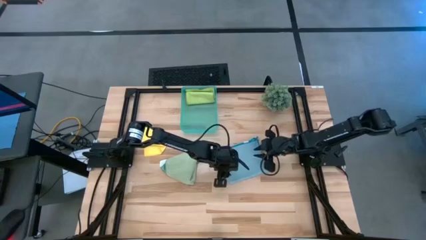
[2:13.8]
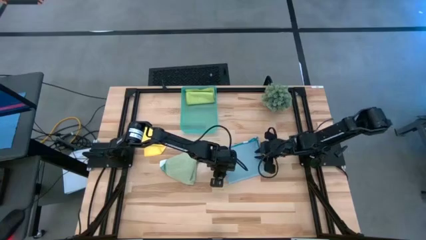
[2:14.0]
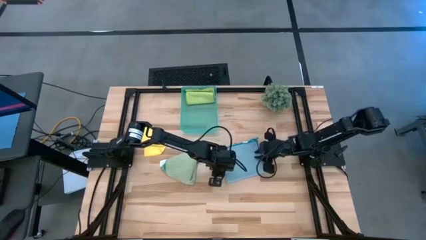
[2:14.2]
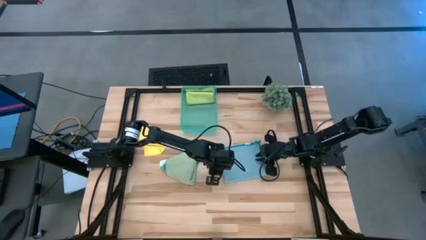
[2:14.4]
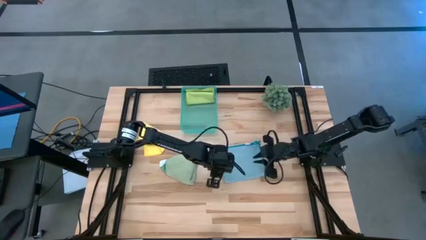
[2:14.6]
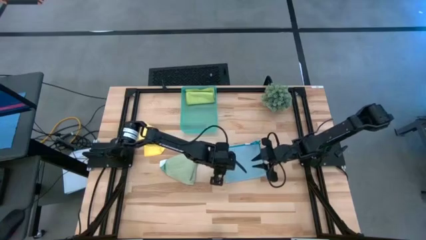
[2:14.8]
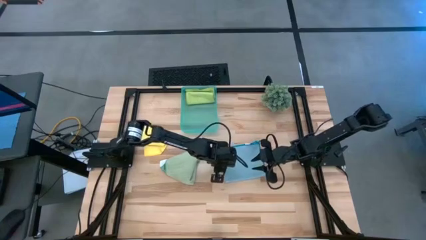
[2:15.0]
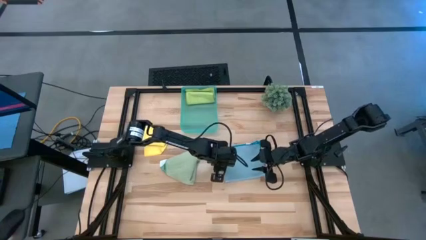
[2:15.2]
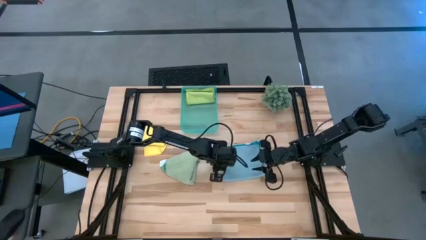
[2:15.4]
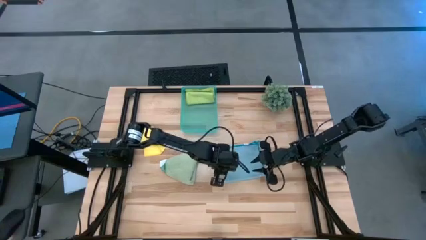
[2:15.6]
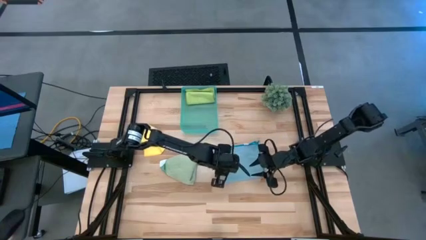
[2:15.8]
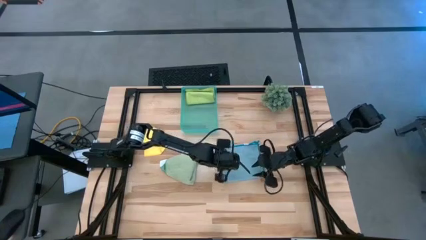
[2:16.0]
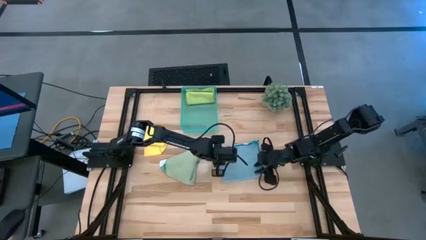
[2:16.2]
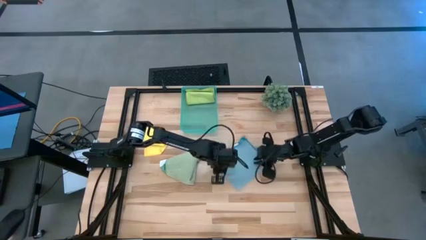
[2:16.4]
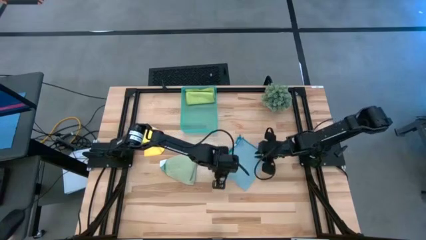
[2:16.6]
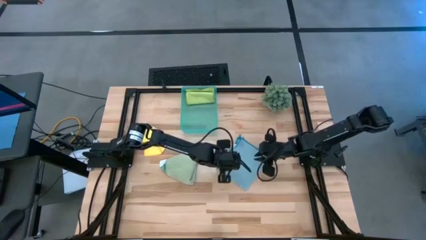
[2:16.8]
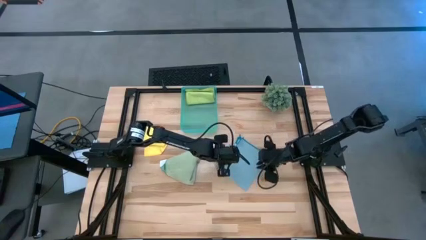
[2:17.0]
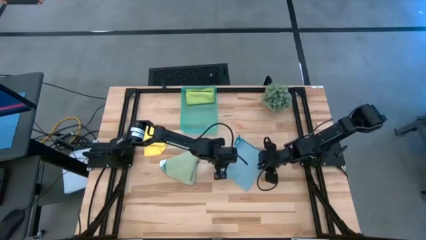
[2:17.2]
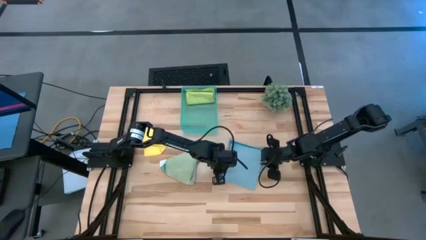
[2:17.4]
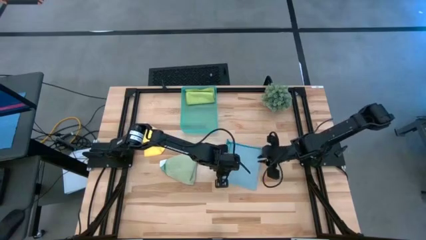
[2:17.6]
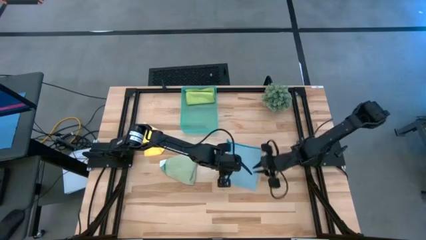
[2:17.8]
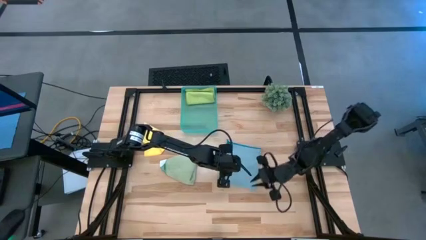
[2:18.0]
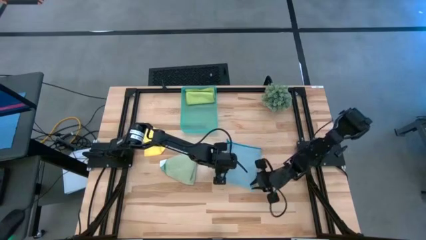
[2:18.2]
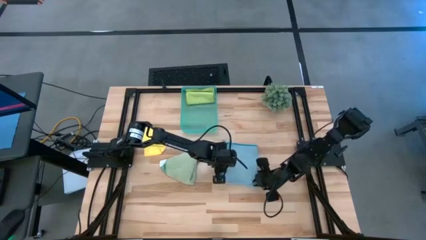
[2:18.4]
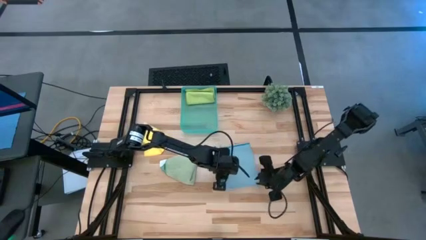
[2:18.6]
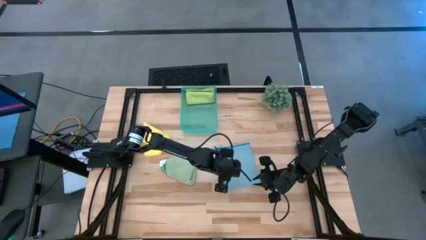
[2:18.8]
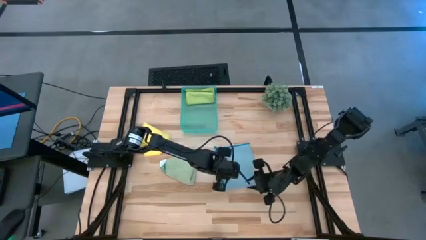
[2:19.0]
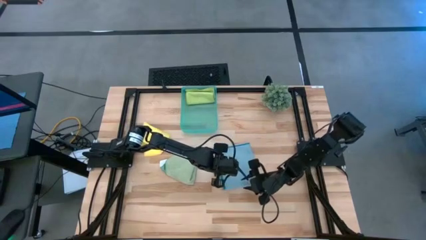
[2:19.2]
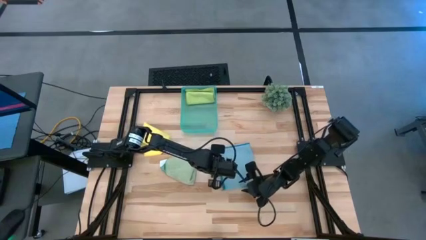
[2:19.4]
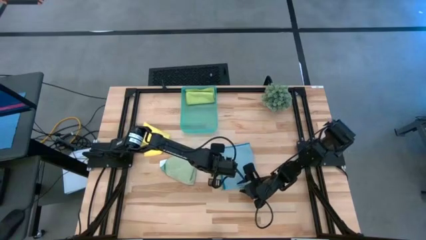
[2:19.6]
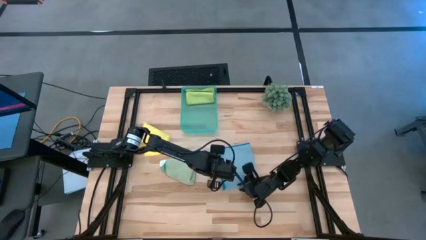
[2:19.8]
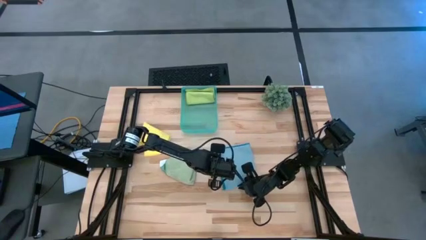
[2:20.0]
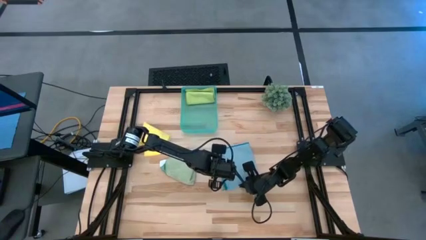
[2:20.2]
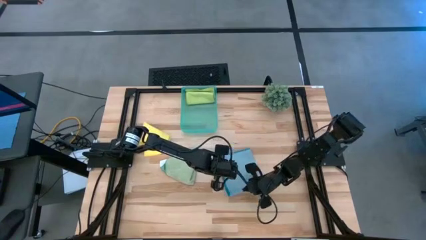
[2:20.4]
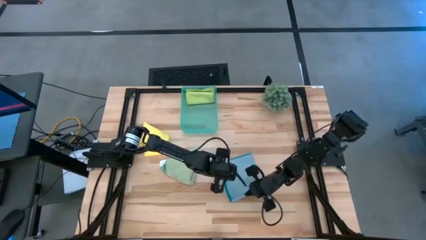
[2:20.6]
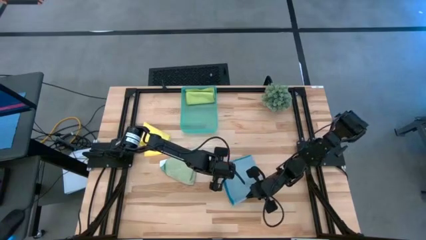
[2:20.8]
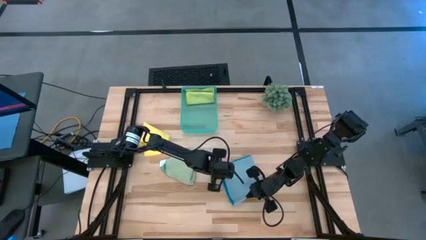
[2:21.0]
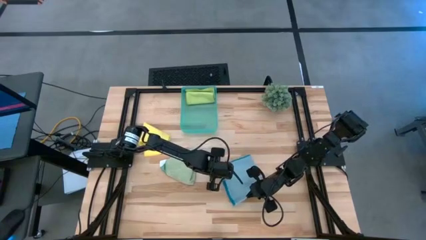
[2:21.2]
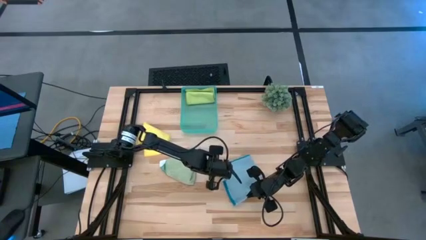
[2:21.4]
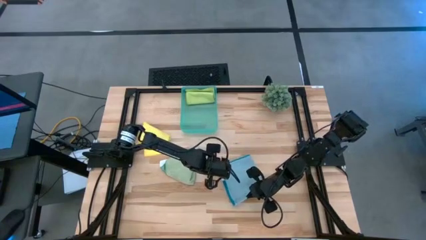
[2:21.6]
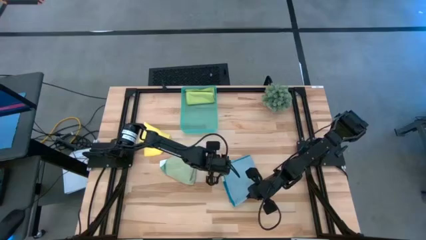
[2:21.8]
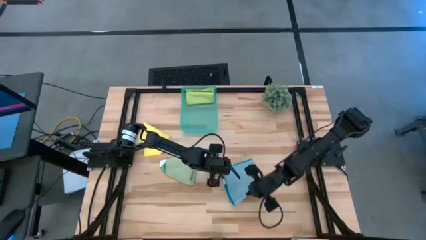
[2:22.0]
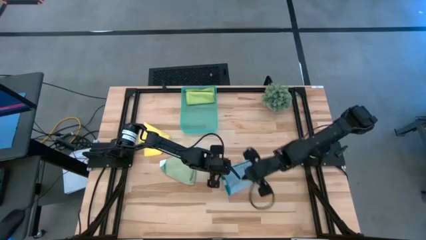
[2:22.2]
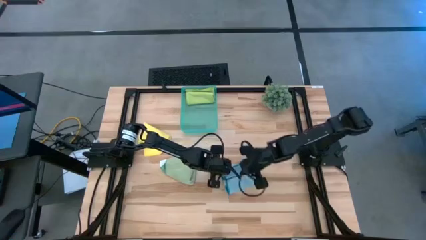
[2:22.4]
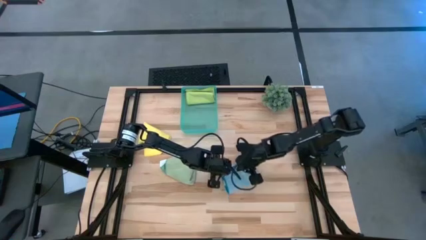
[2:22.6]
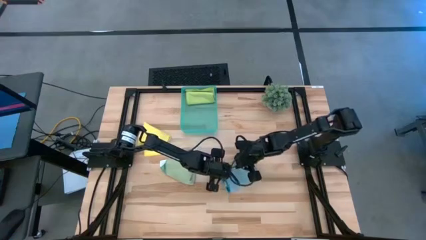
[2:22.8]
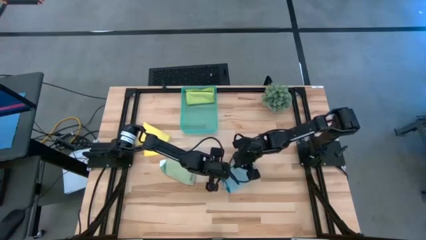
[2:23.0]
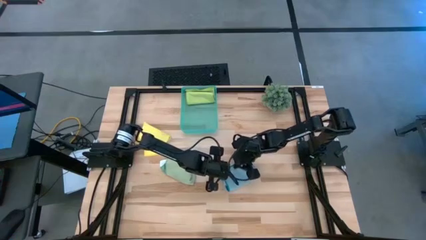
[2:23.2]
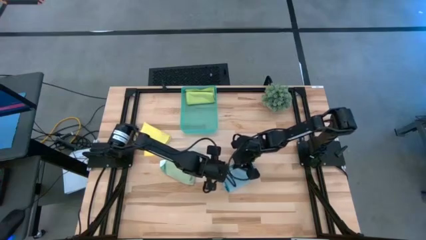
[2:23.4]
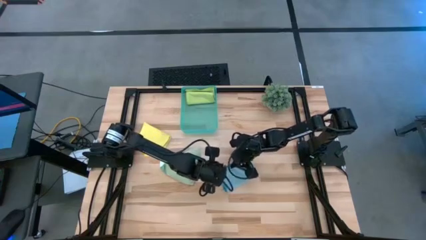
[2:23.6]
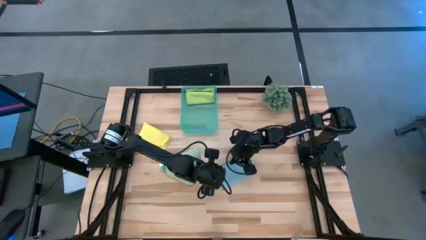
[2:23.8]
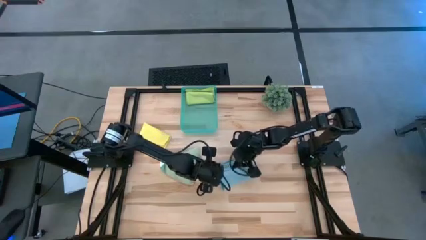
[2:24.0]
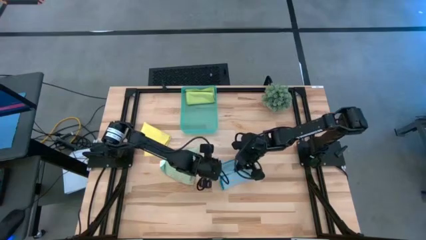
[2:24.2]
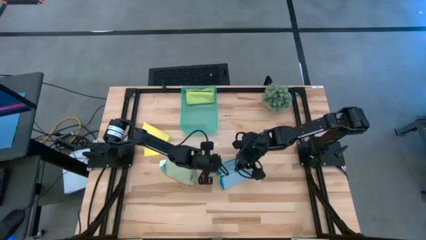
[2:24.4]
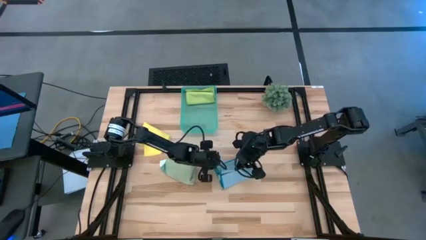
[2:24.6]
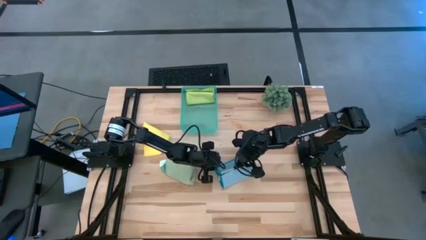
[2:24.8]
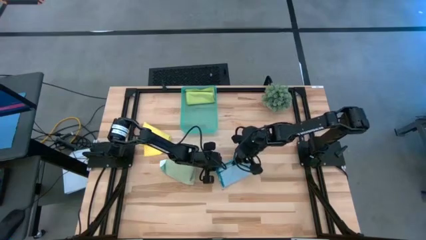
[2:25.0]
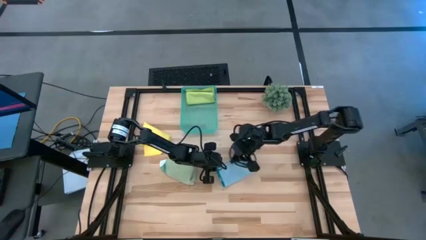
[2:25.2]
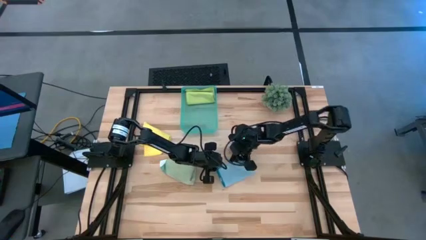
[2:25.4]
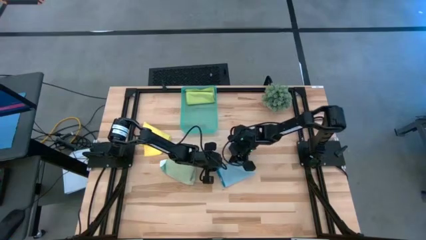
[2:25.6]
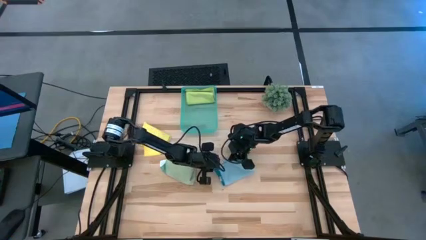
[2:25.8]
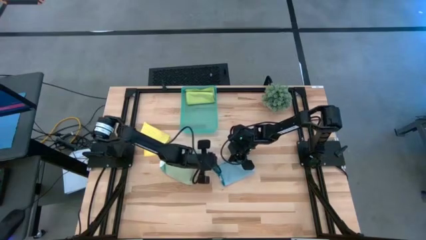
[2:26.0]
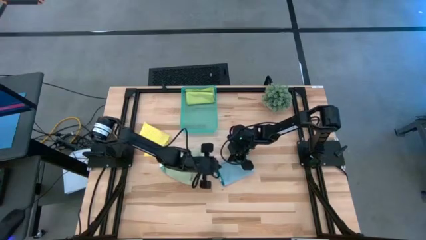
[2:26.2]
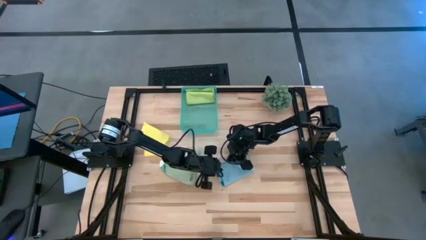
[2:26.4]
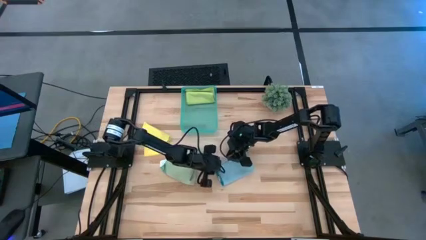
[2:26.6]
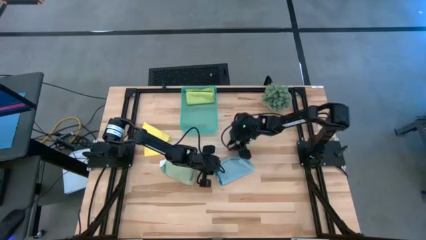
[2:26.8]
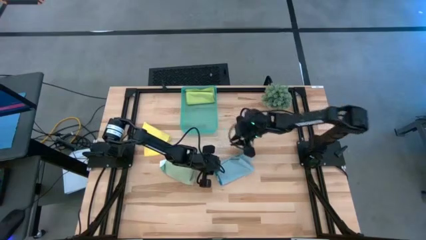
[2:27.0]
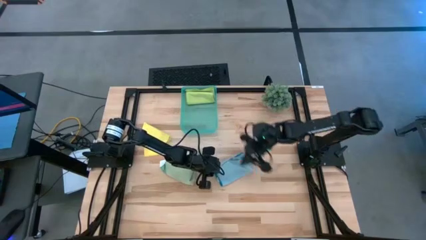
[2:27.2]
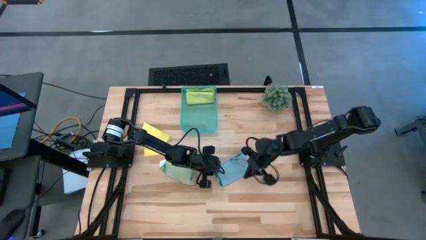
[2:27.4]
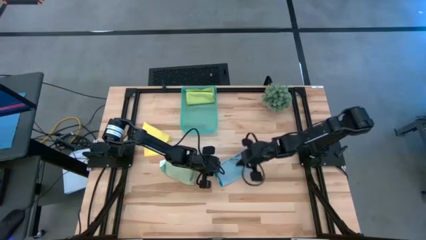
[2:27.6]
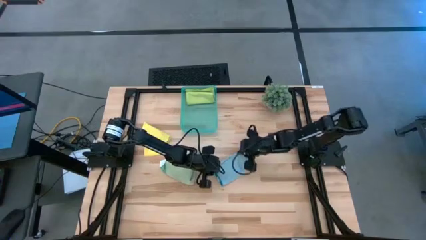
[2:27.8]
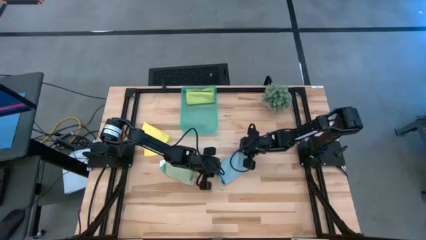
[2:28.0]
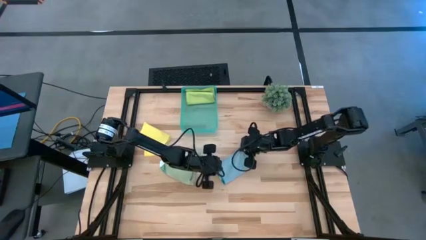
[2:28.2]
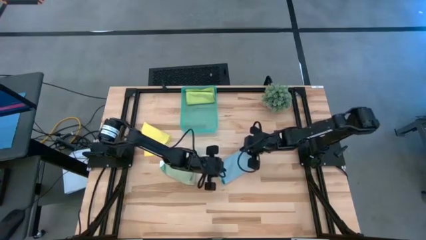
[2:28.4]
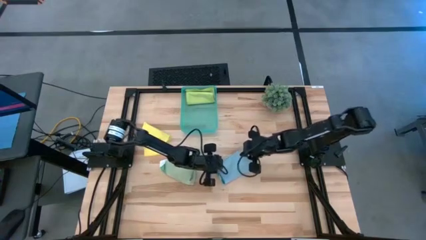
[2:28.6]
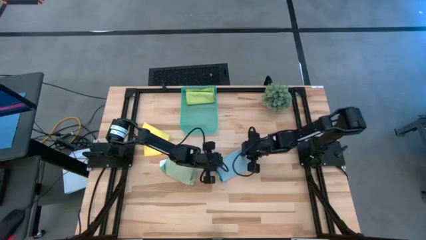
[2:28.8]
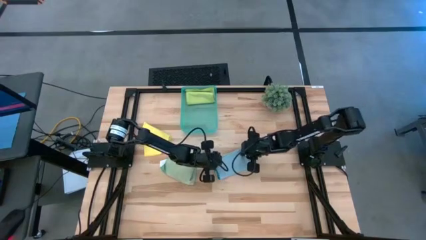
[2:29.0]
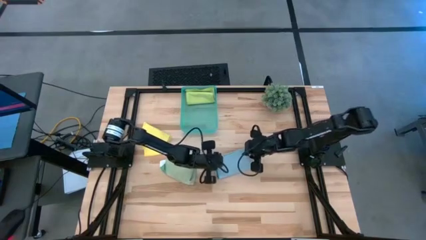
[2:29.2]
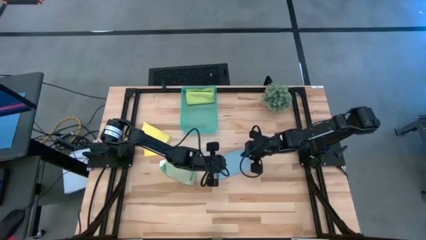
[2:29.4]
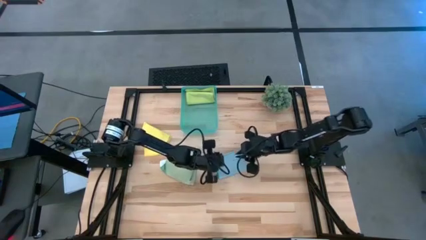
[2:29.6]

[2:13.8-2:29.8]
Task: Fold microfiber towels
Fold the blue microfiber cloth
